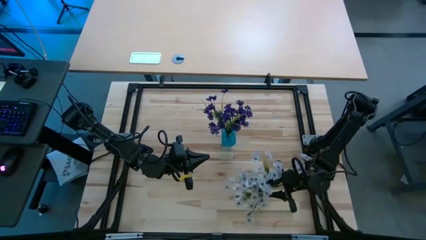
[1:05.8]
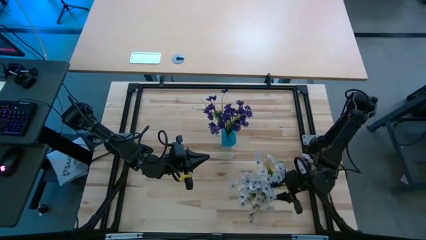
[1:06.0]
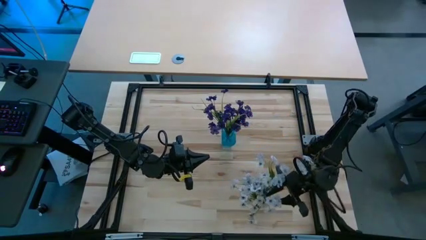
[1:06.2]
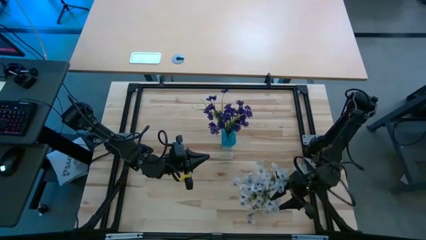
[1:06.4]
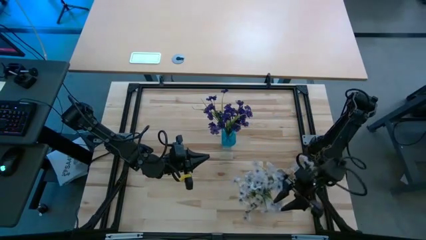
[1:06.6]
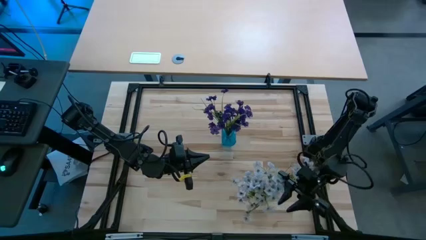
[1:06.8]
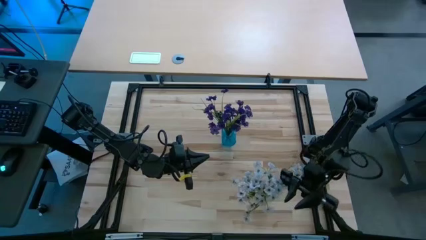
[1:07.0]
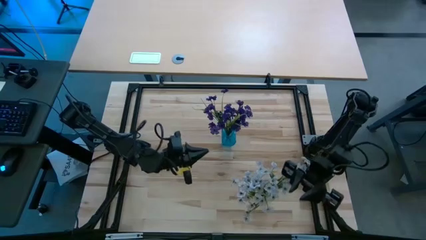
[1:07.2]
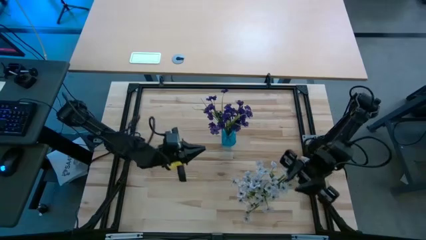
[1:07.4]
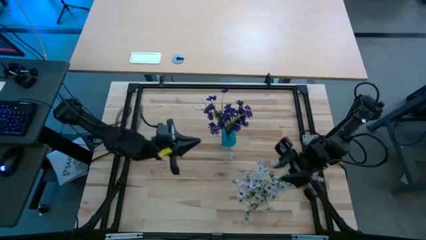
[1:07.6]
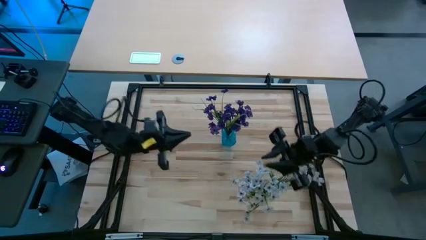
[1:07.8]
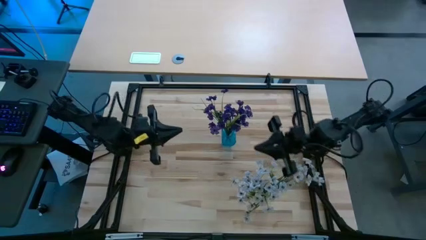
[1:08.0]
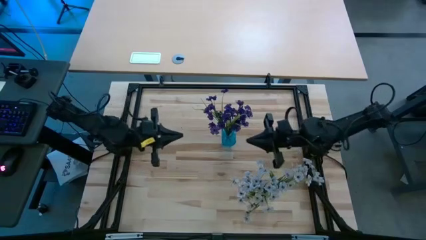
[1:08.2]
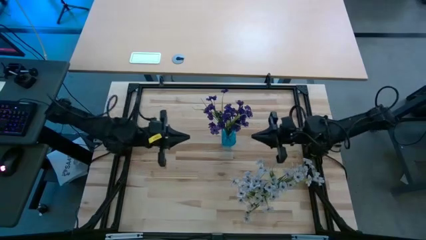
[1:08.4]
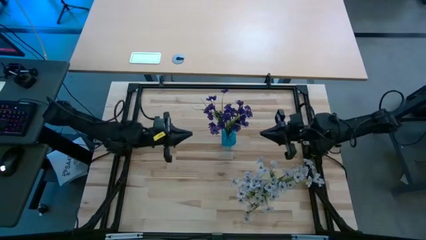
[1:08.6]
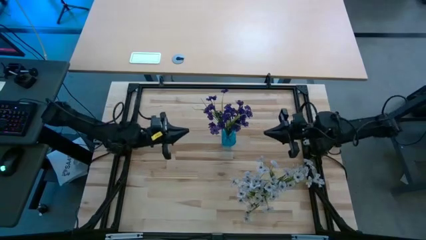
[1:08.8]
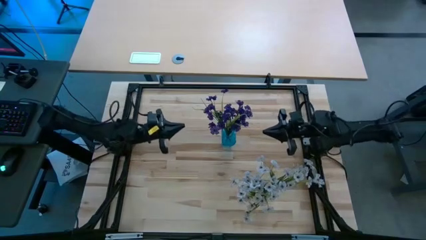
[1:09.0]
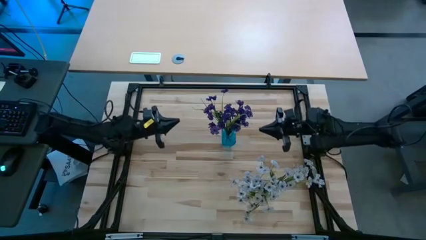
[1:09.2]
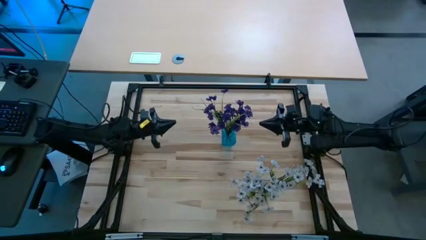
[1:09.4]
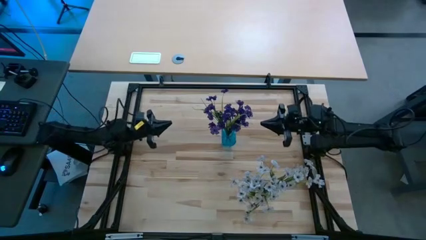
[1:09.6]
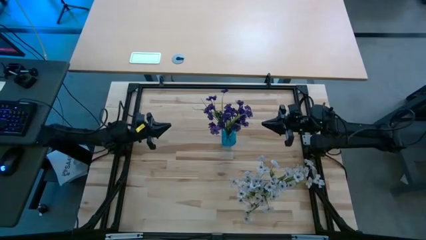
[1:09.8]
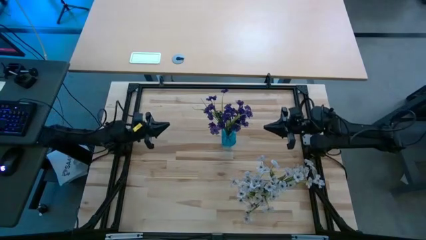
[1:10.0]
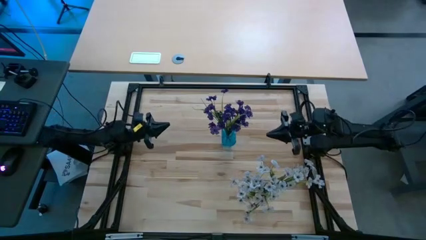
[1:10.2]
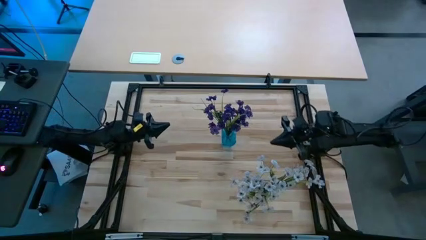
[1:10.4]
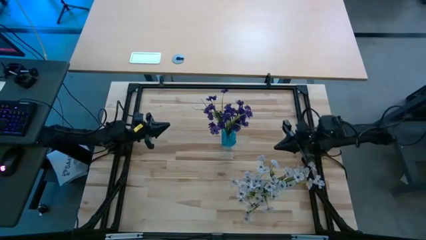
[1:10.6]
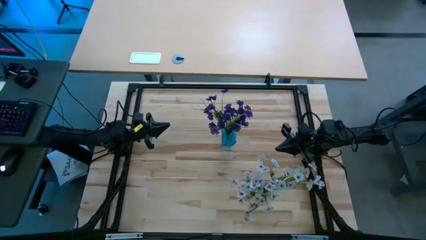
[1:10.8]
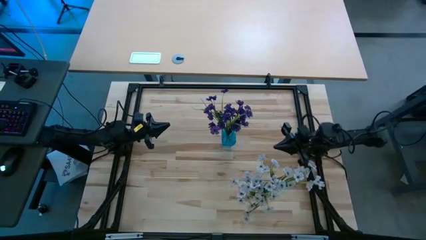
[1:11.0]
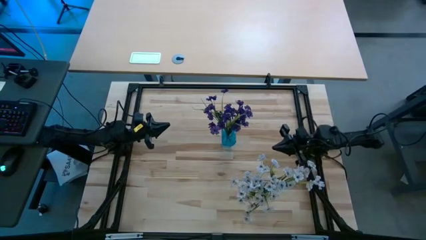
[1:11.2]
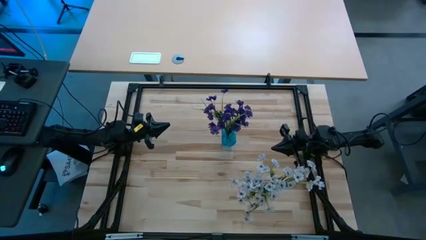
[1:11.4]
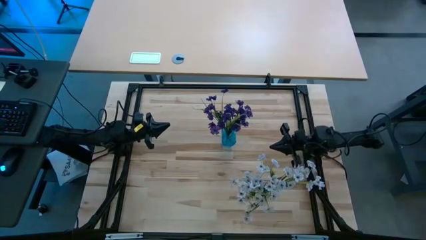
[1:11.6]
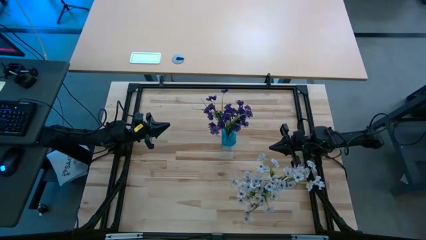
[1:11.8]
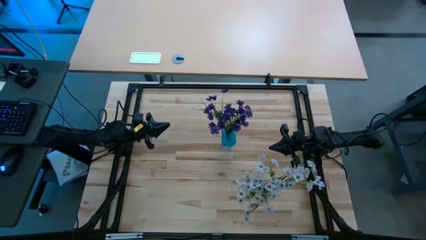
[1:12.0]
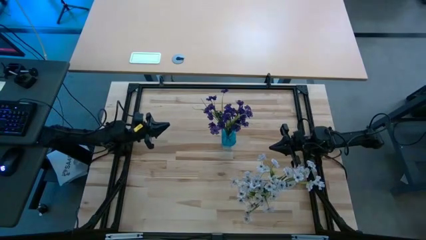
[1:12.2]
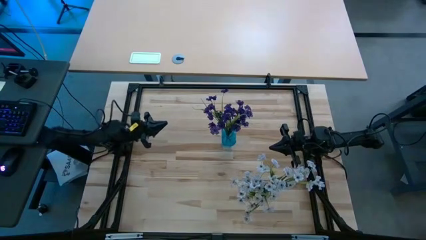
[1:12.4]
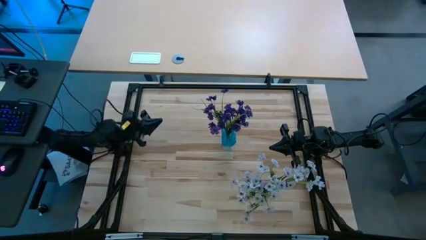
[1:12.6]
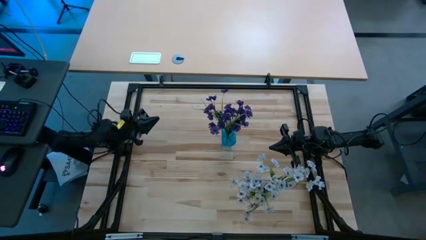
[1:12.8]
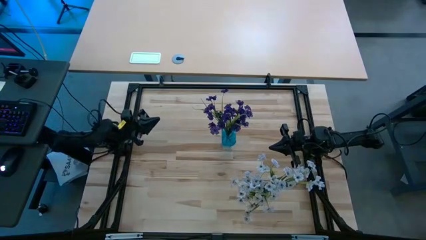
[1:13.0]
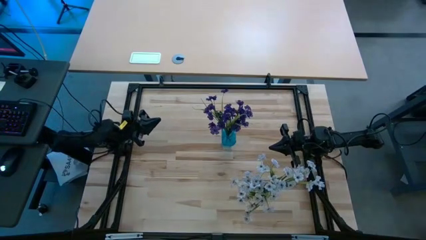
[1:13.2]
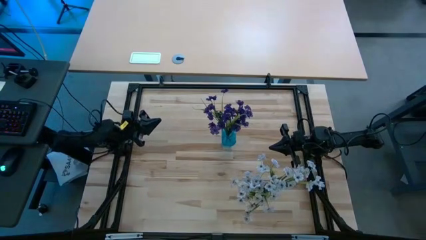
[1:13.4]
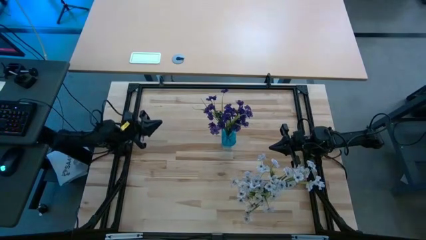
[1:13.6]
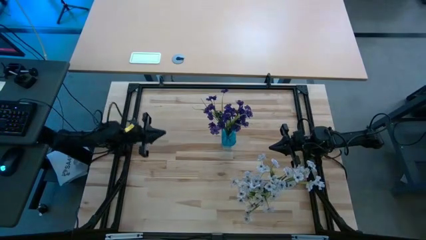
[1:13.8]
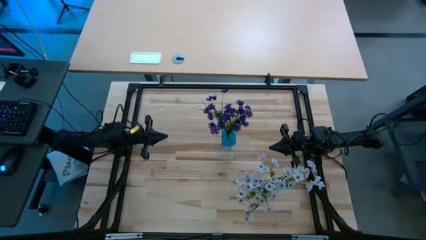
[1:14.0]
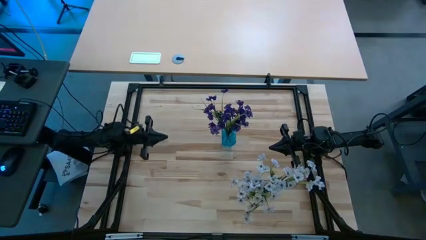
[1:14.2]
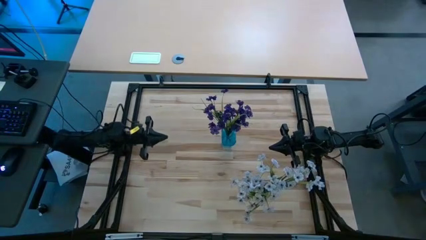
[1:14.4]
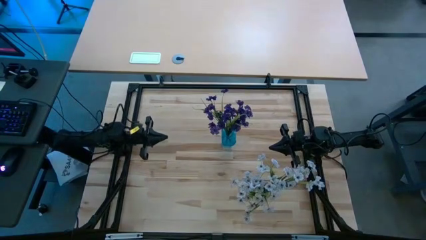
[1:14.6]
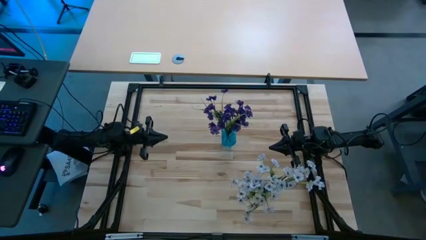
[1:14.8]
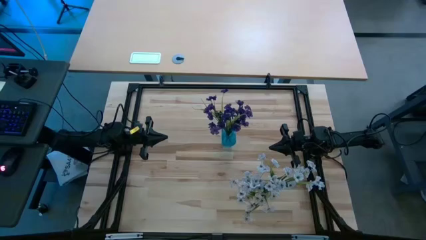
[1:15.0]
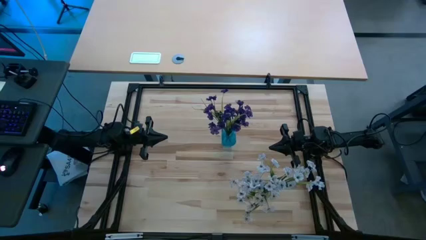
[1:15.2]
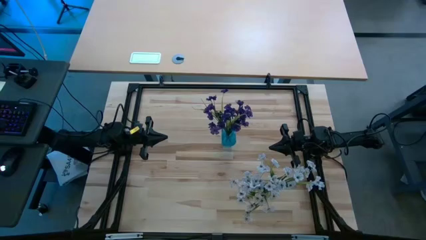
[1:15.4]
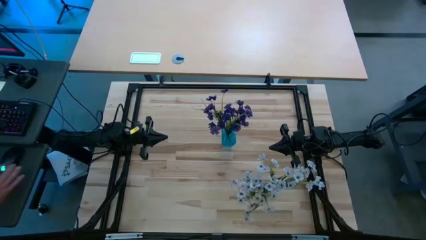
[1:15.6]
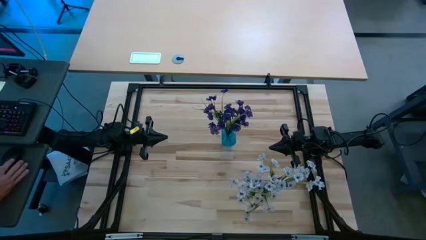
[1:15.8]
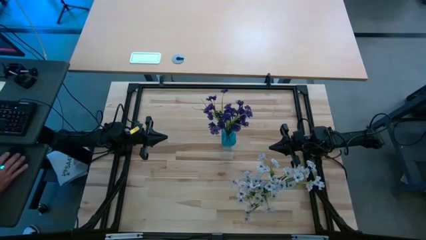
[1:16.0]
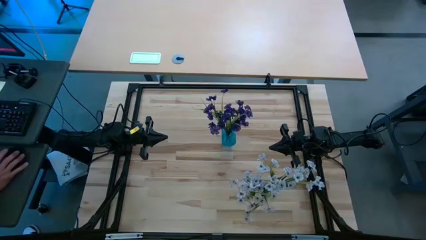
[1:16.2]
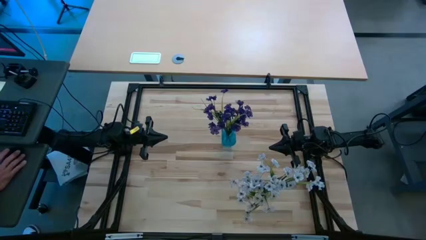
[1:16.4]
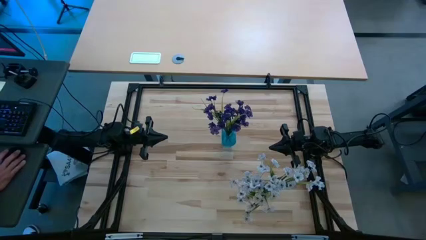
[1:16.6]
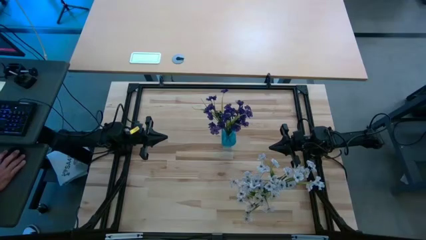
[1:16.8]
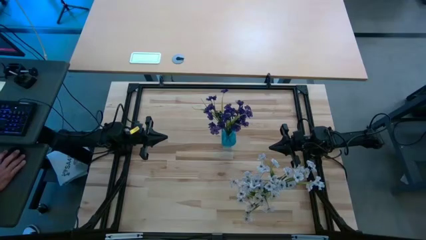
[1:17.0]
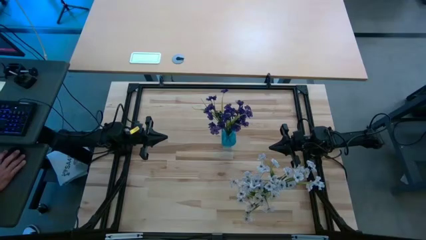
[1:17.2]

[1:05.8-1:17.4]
Task: Sort flowers into vase by color
Return to Home Position
